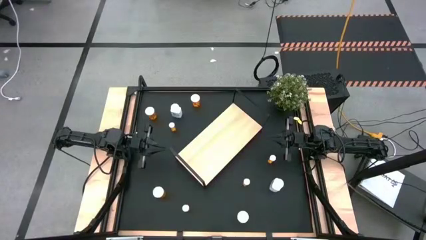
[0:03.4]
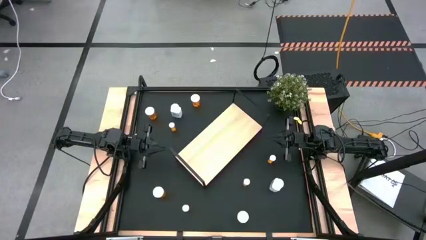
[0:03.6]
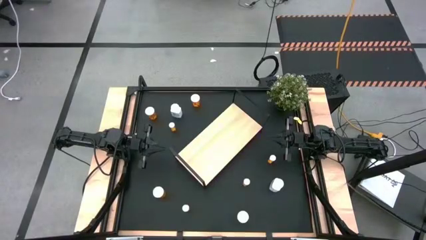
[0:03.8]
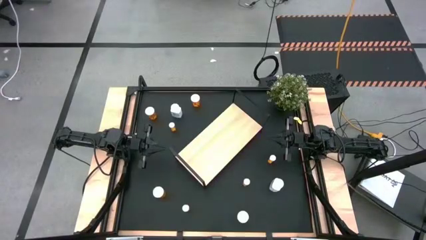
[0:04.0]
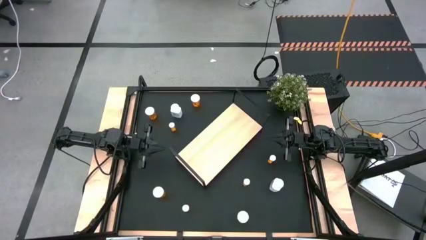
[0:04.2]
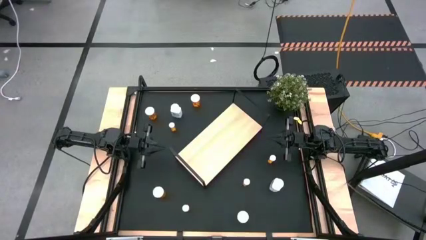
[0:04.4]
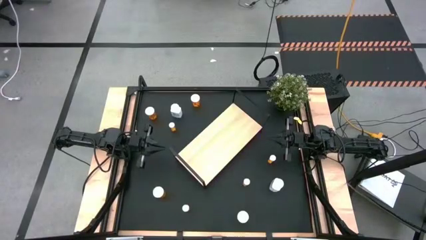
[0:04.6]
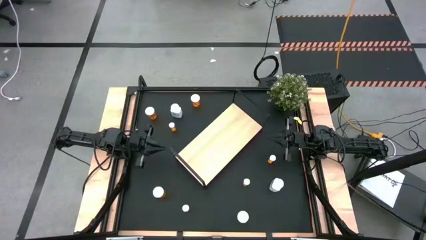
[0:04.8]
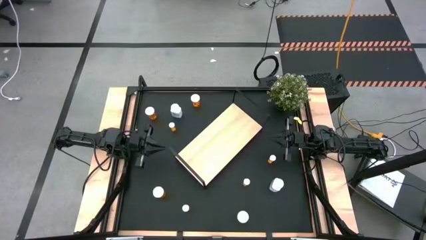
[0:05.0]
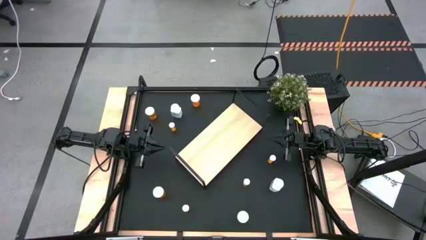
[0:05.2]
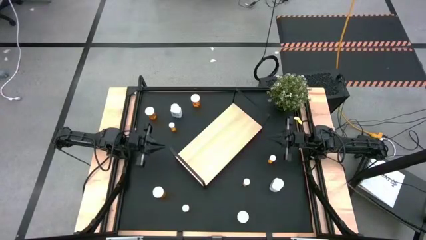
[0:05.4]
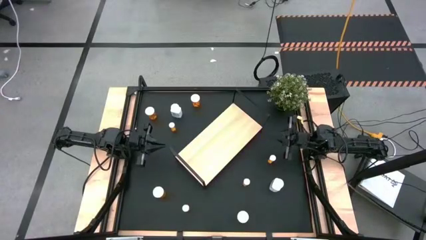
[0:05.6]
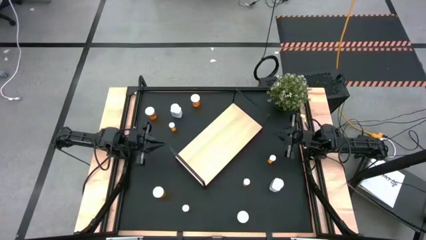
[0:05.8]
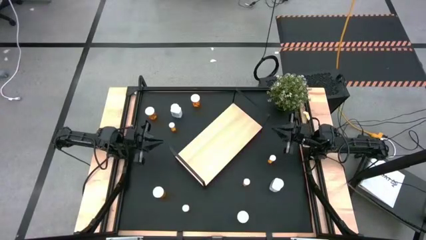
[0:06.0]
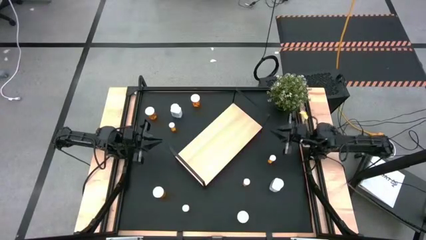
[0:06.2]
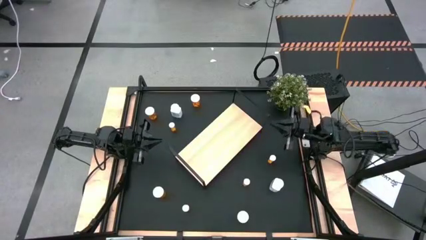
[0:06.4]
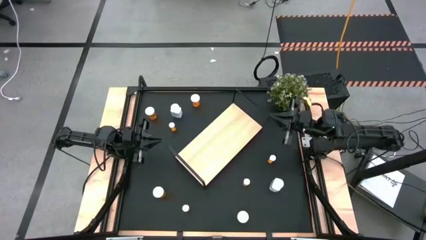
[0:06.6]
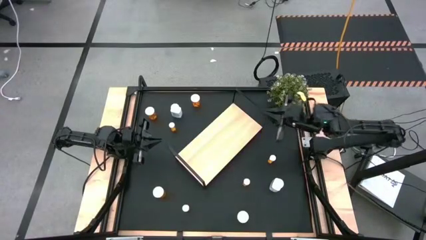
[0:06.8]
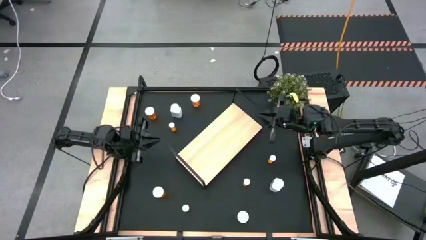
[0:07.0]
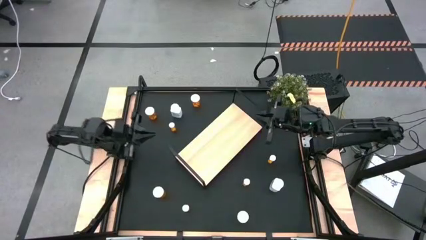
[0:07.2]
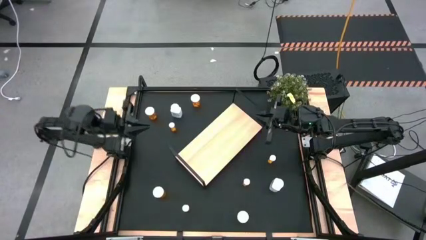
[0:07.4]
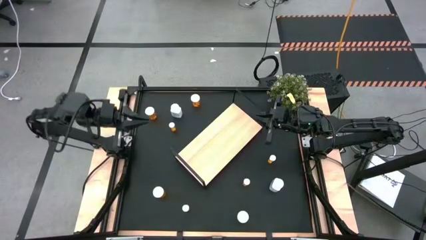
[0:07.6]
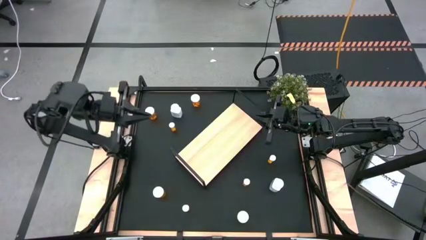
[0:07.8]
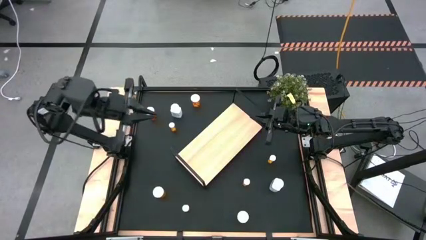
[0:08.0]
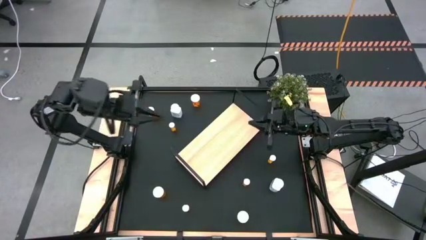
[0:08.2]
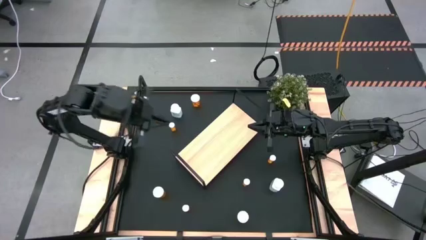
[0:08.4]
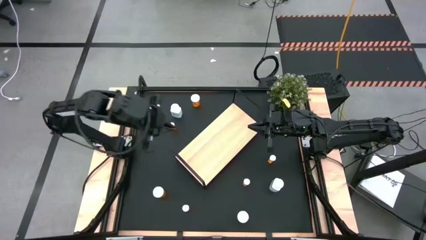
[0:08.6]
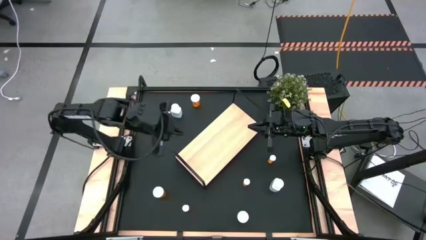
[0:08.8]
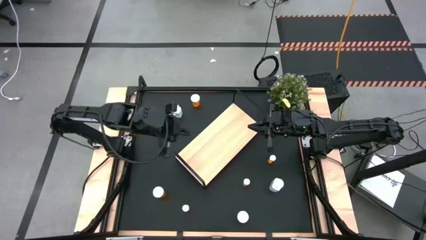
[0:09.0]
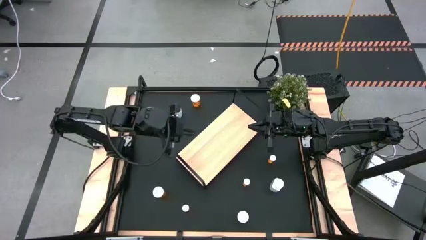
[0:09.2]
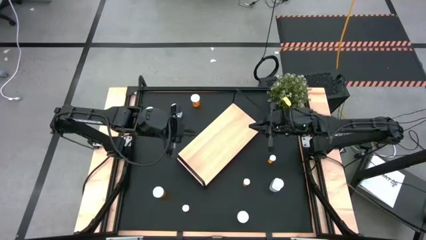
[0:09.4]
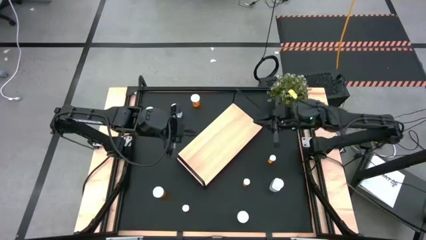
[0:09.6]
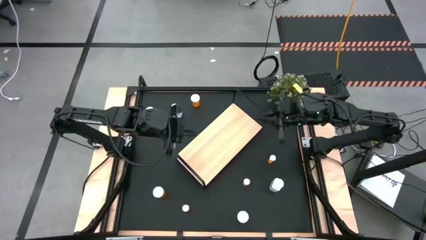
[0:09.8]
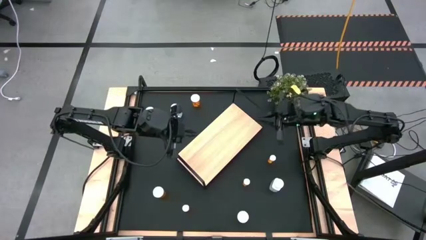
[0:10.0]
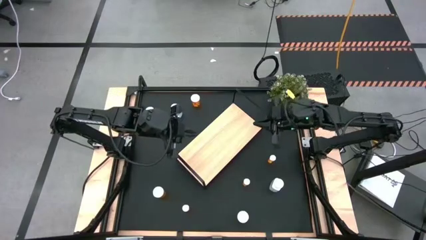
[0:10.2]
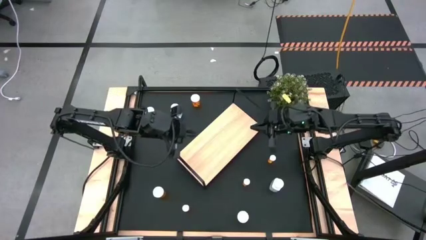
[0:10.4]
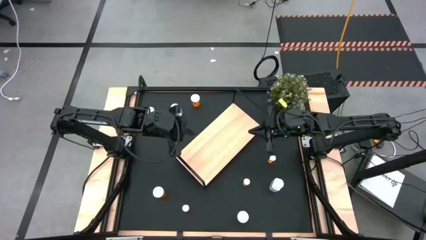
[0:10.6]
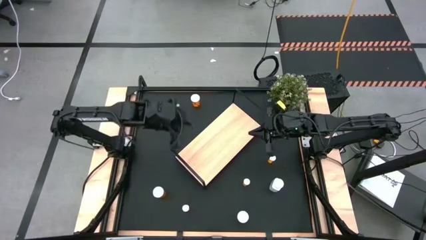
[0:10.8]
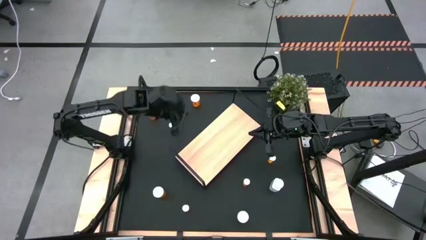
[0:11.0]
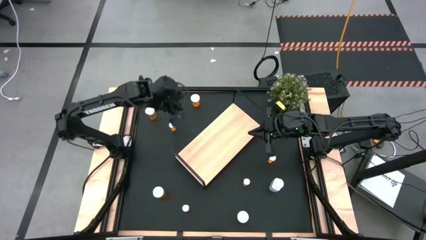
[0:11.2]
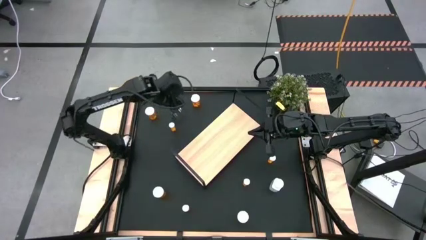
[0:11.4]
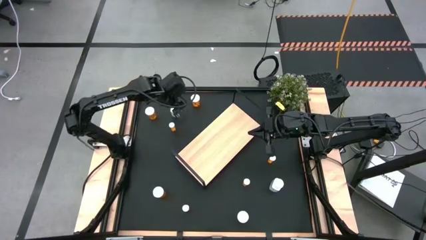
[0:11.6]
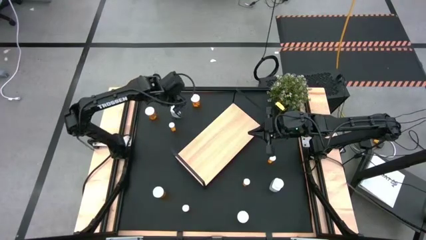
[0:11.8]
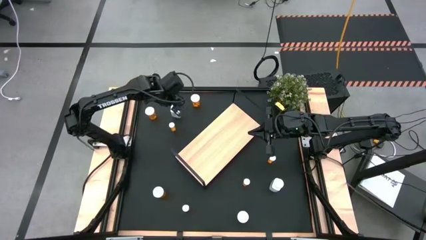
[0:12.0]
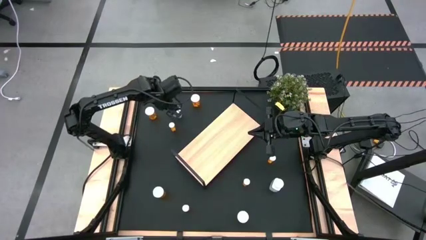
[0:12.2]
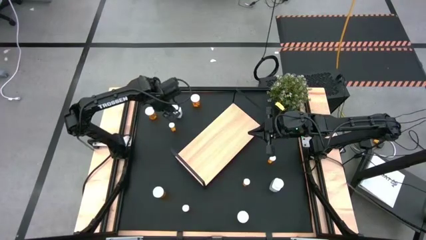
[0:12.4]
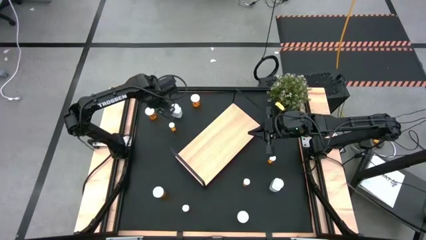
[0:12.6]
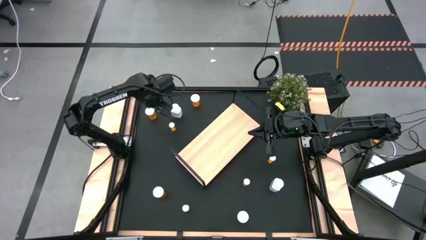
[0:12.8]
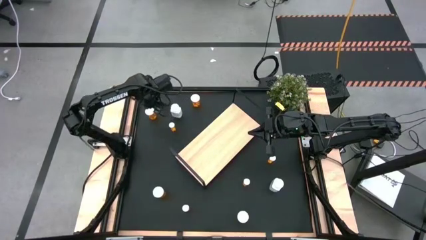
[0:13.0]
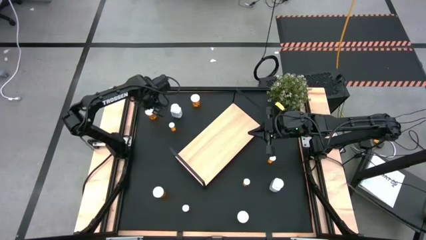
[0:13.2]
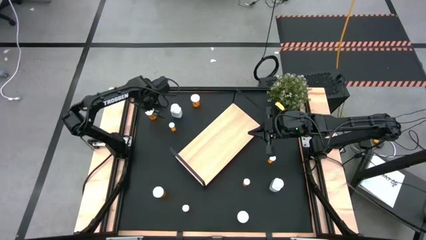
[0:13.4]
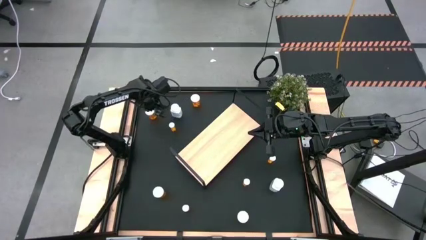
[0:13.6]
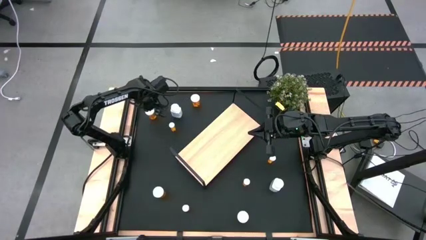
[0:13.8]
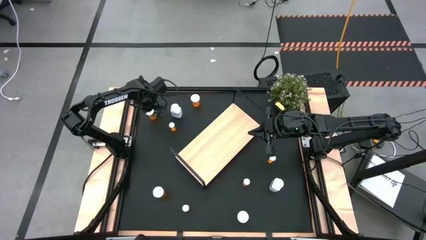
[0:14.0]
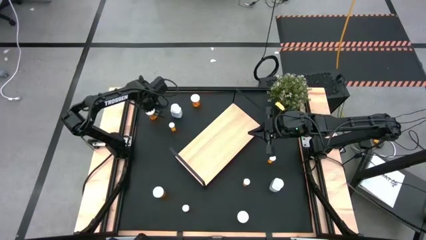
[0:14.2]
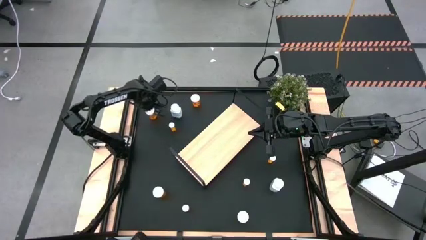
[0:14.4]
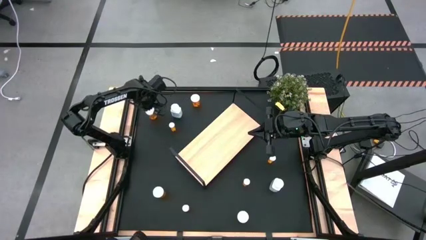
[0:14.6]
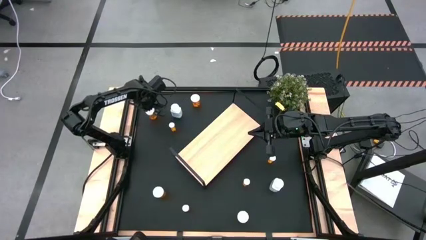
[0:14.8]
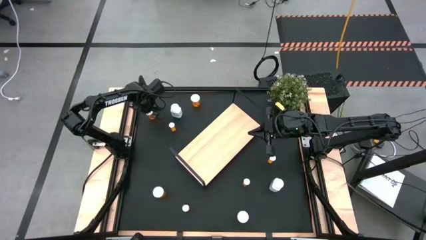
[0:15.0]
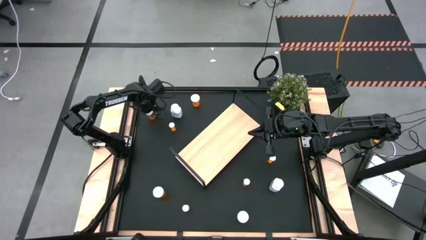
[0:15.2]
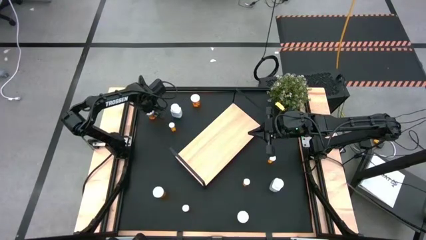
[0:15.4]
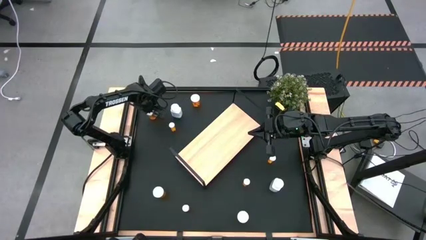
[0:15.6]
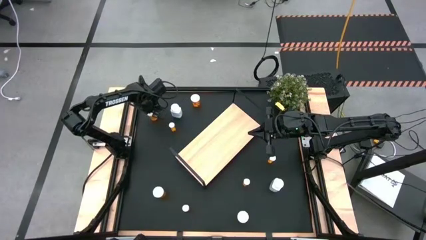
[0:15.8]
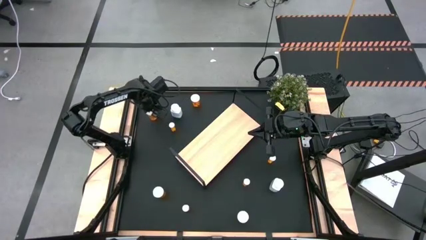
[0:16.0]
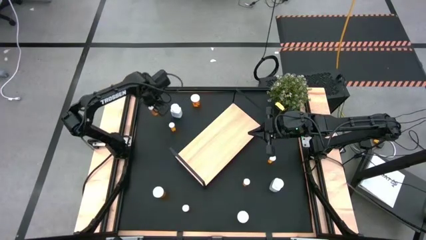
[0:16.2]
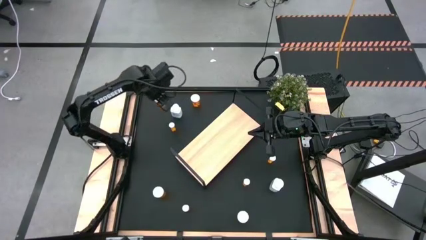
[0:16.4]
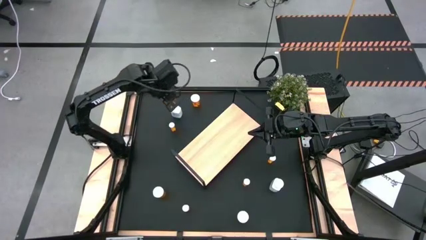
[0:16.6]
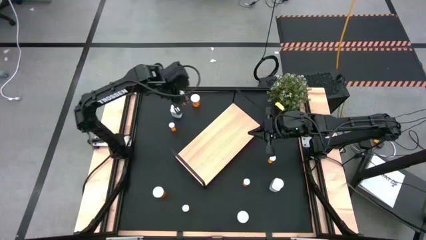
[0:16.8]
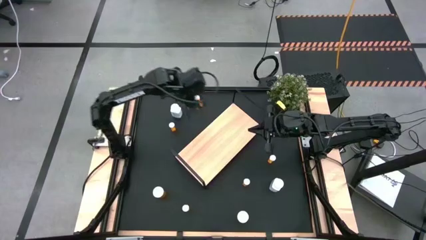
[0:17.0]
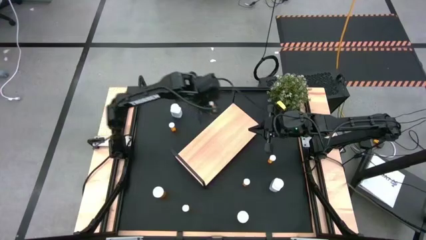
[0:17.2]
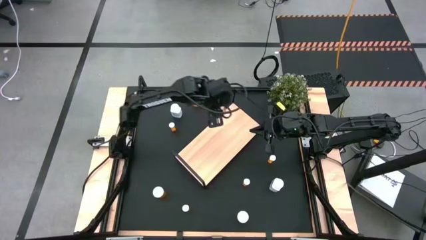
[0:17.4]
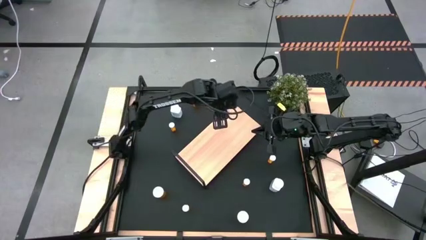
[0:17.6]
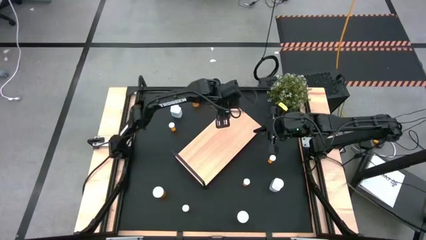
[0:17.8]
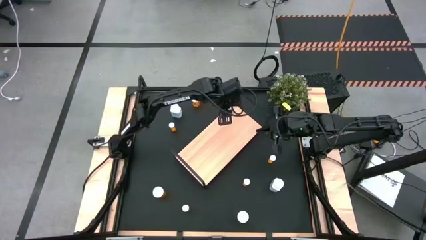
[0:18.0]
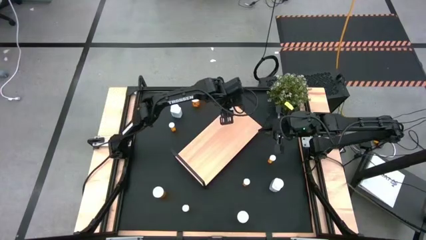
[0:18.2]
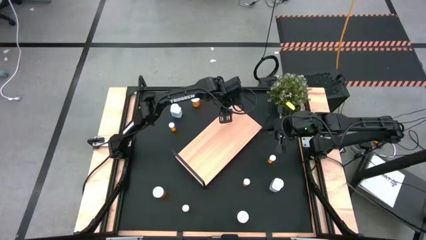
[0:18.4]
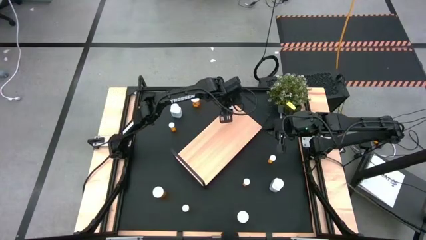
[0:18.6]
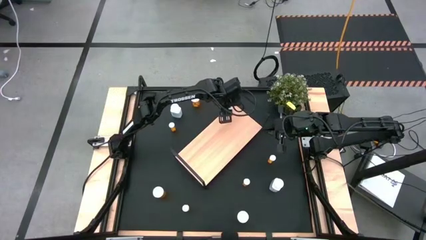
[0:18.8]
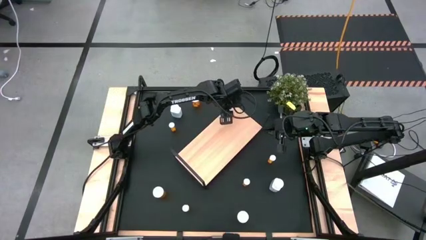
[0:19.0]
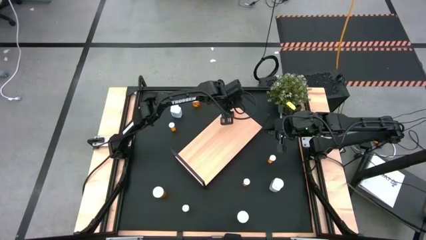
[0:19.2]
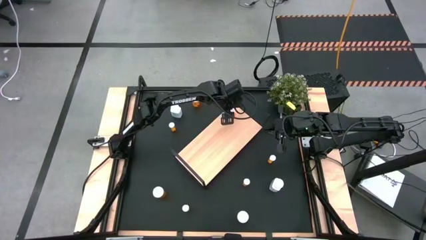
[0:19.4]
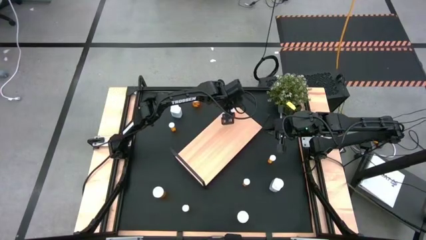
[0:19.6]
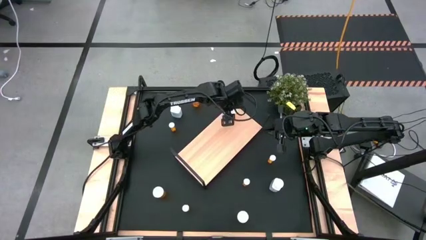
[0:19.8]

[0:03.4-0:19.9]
Task: Pick and place medicine bottles onto shelf by color
Put the large orange pill bottle on the shelf
